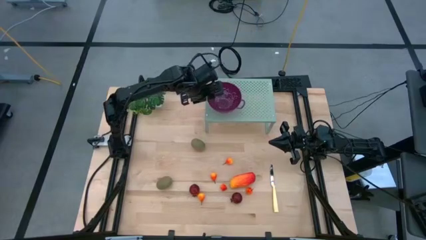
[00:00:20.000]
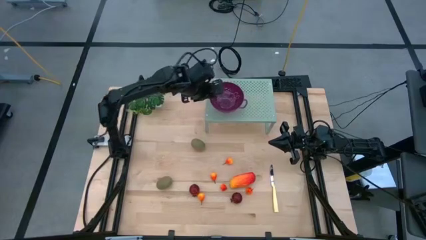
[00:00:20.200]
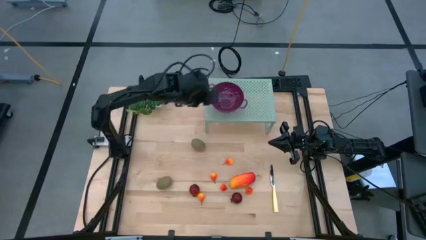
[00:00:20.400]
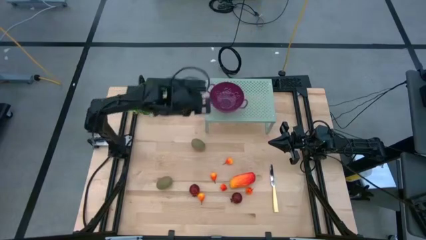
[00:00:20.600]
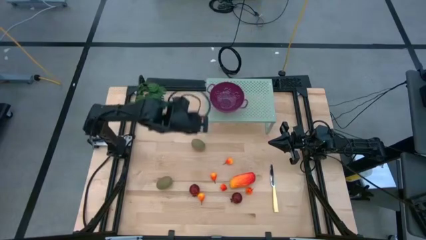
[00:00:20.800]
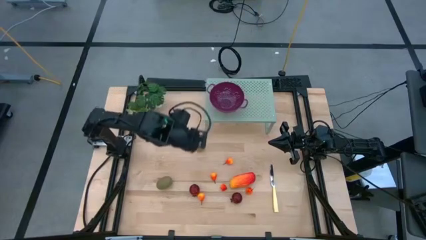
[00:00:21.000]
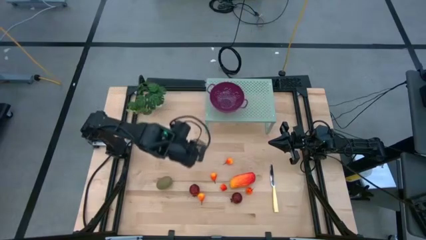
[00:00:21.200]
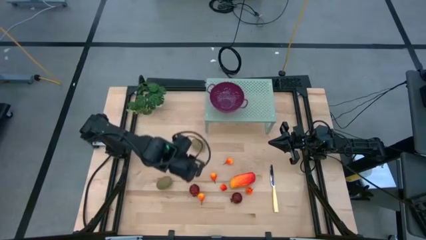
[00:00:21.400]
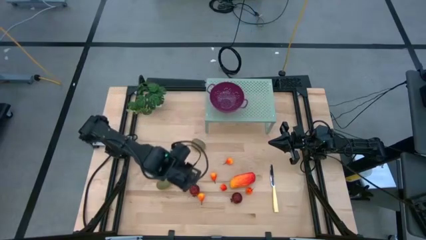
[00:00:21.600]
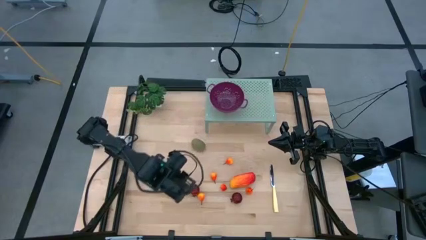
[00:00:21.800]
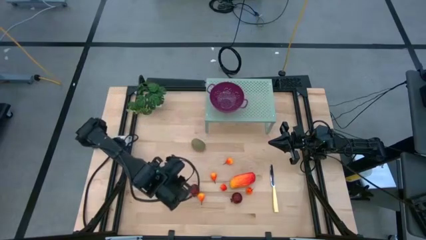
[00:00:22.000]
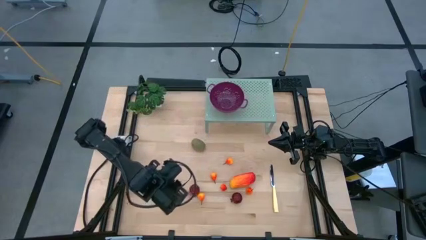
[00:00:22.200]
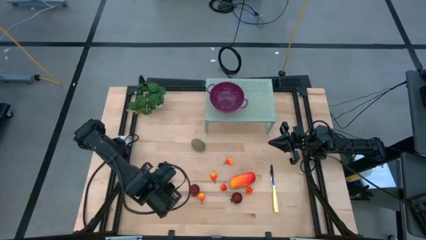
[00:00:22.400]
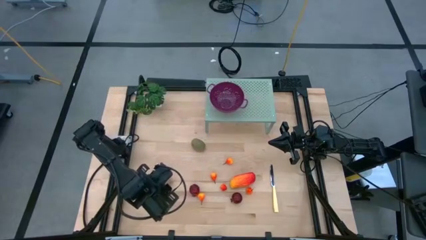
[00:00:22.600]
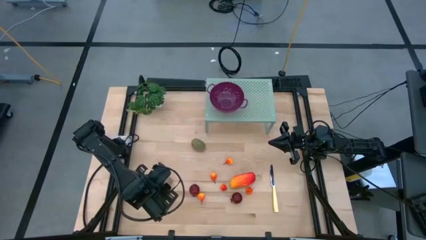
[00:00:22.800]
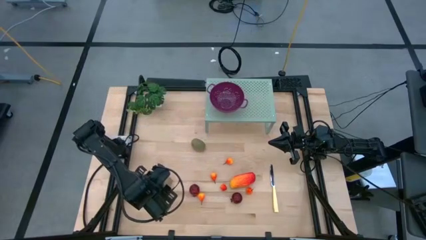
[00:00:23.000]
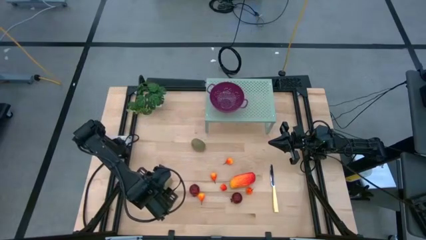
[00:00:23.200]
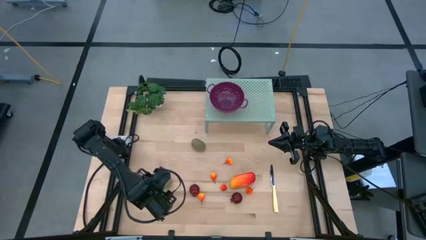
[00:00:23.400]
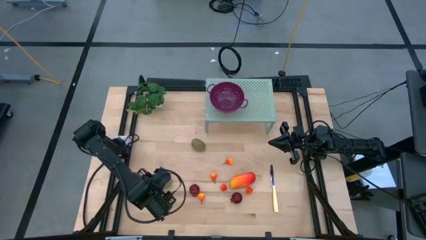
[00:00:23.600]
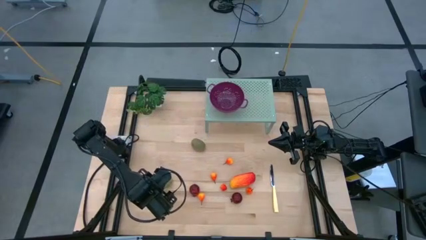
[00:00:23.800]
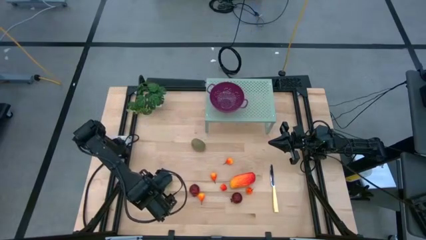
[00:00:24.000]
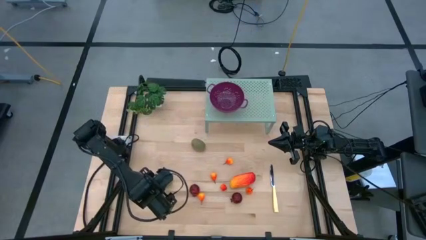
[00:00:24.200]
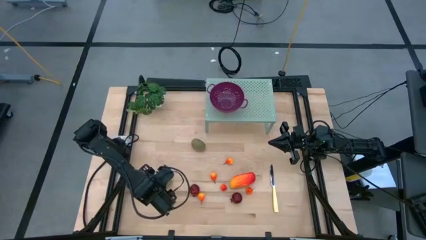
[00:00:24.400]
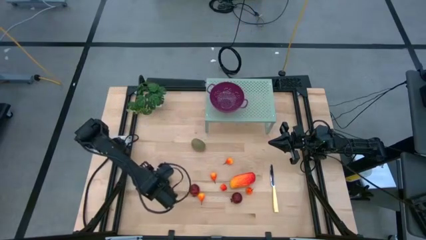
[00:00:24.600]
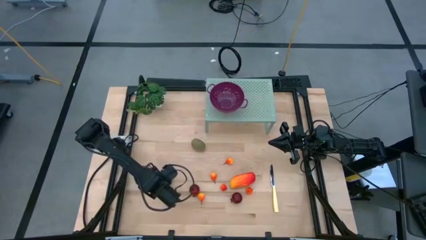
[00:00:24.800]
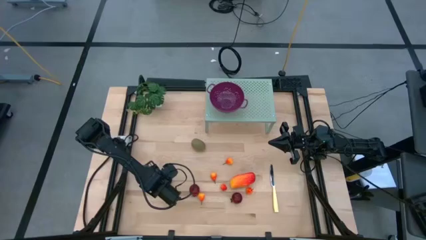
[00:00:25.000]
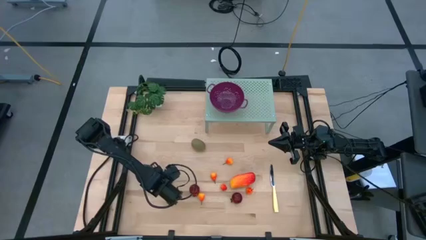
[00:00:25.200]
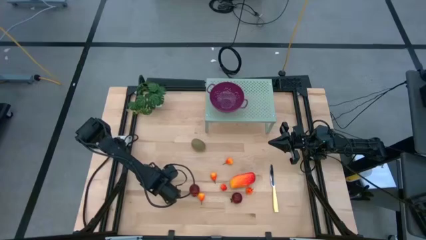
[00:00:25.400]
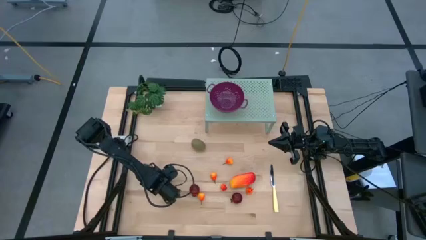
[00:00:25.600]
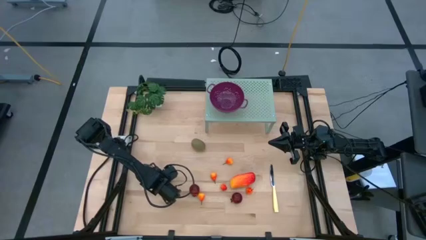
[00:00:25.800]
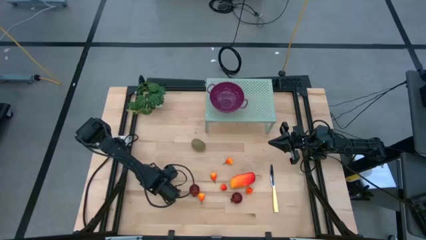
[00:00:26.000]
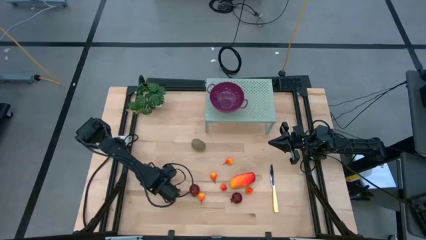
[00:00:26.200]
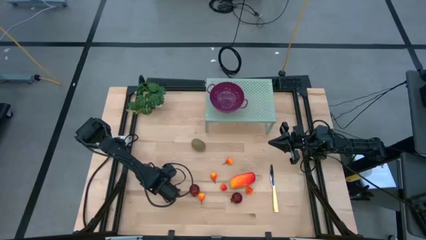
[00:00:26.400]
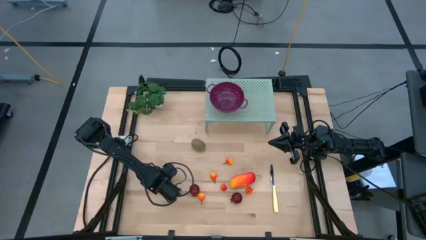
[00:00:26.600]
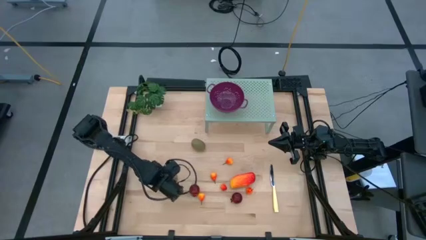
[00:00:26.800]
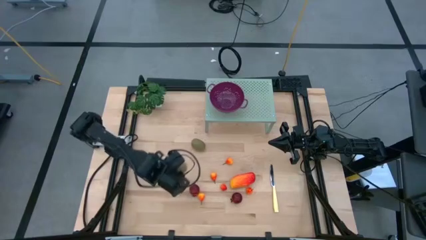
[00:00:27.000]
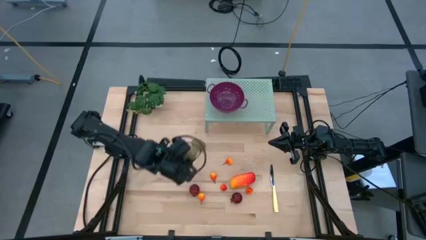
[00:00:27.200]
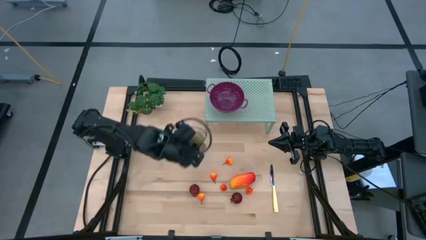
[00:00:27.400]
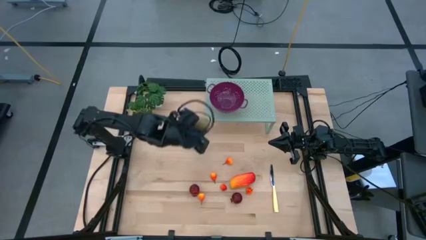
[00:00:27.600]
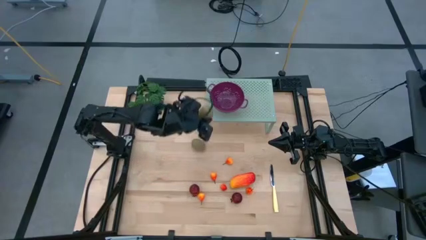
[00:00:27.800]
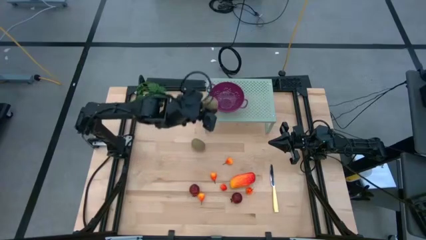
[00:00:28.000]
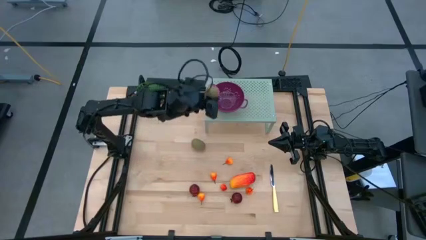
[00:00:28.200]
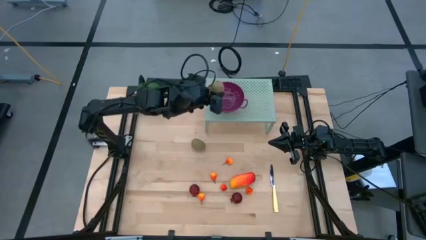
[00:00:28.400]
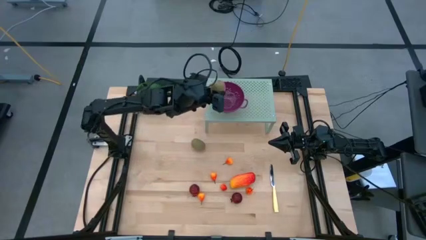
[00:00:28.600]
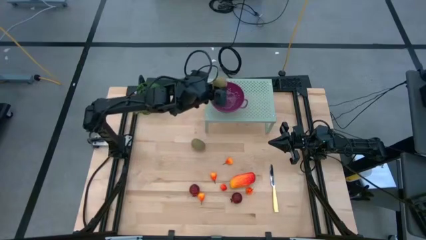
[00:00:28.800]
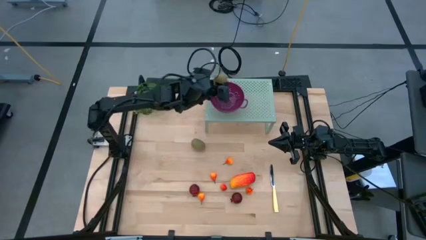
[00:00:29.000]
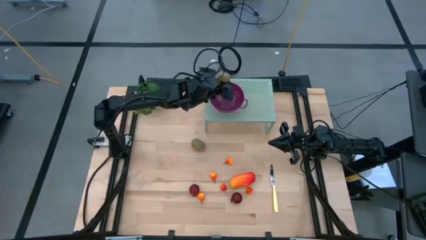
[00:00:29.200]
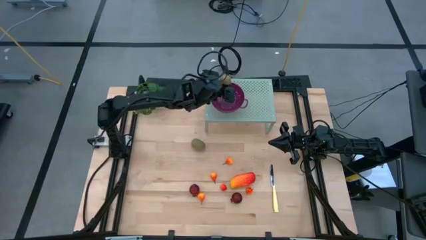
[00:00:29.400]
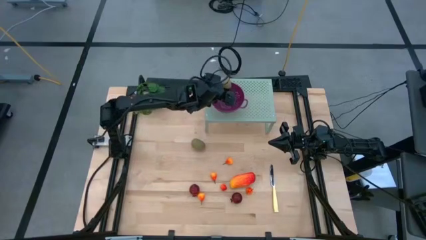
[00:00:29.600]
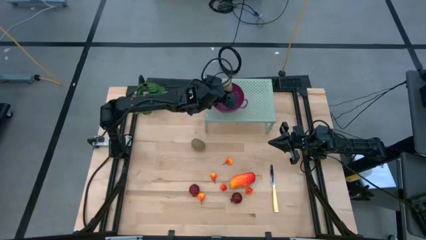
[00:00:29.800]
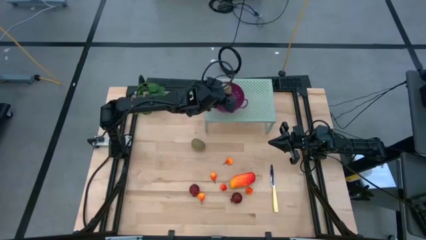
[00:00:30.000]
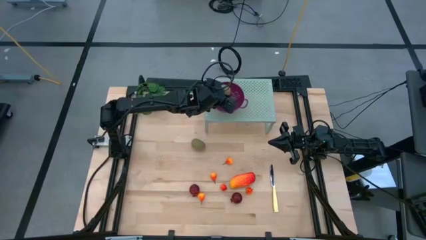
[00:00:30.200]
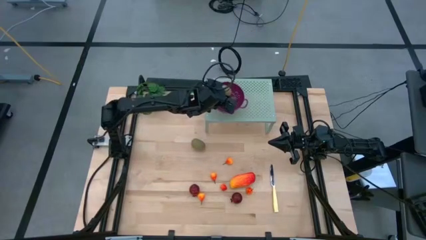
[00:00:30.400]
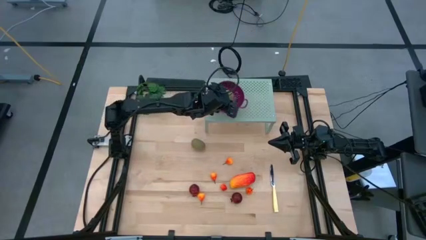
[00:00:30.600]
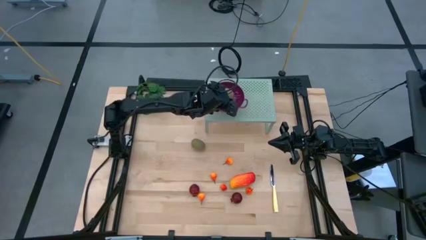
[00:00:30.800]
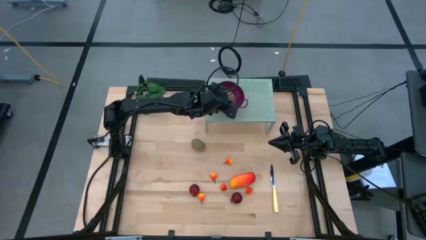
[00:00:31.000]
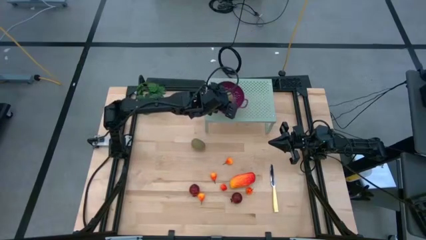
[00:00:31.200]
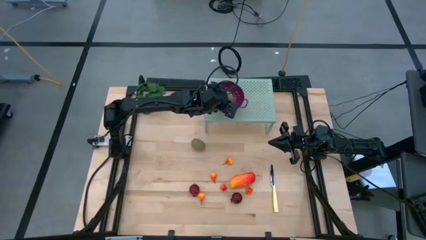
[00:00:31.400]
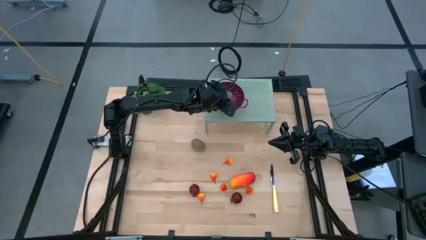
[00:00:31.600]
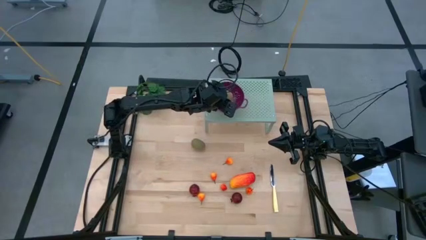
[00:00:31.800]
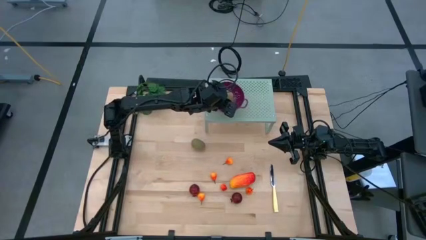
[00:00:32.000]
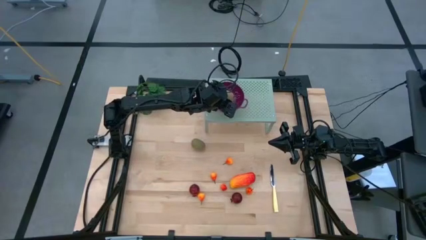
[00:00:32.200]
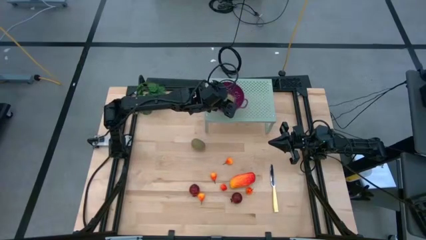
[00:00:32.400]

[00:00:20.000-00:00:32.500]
Task: Pick & Place Fruit
Put the kiwi into the strainer bowl on the shelf

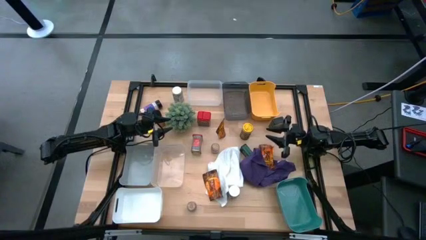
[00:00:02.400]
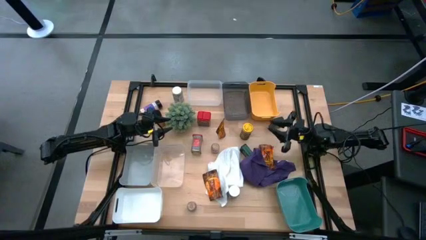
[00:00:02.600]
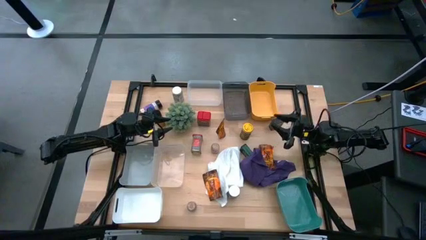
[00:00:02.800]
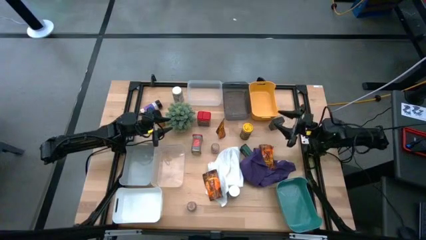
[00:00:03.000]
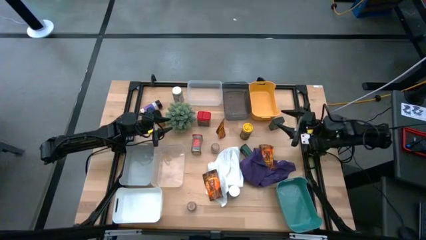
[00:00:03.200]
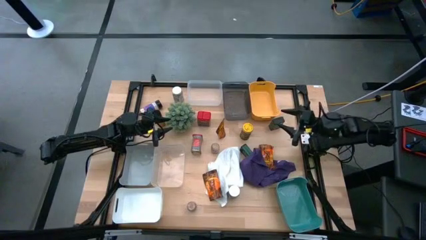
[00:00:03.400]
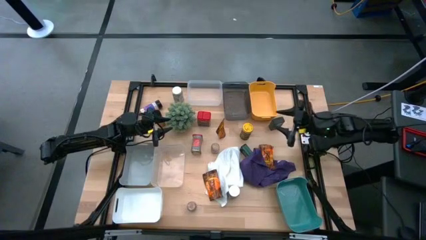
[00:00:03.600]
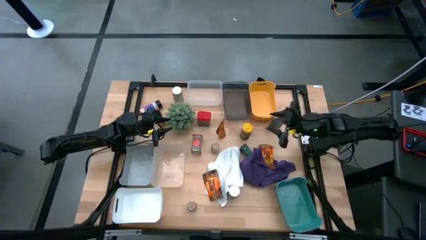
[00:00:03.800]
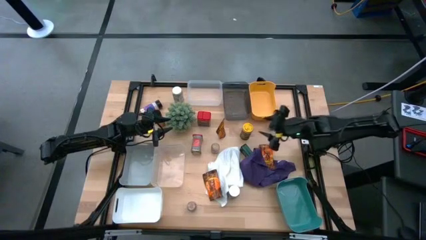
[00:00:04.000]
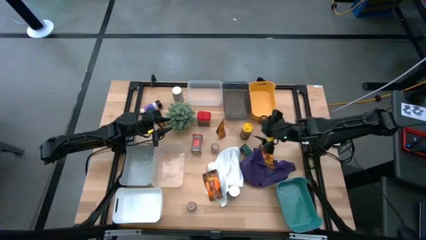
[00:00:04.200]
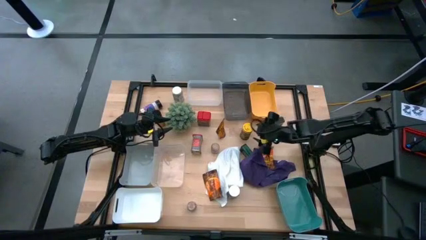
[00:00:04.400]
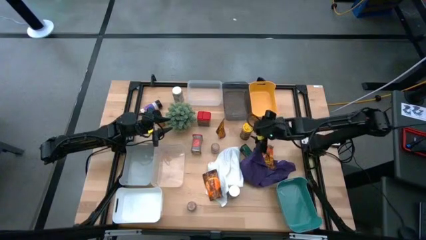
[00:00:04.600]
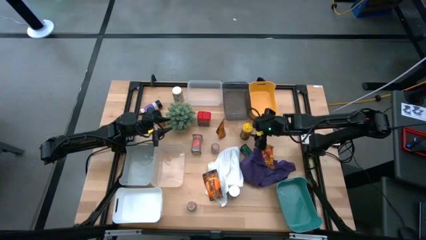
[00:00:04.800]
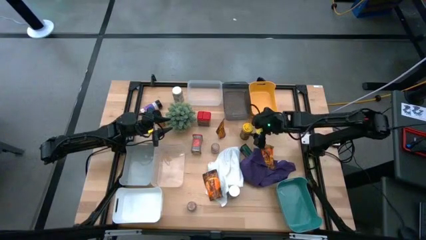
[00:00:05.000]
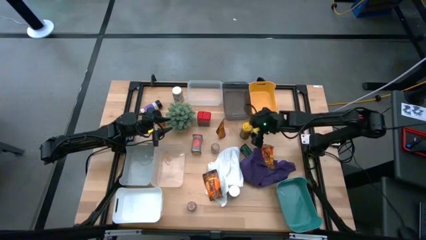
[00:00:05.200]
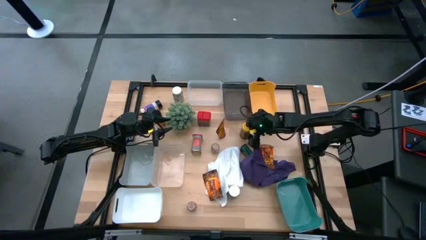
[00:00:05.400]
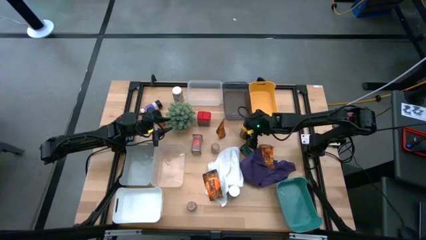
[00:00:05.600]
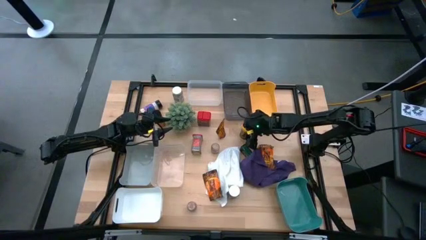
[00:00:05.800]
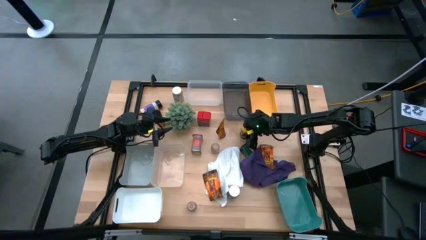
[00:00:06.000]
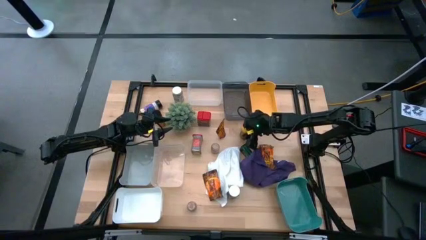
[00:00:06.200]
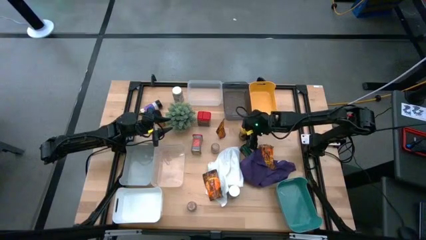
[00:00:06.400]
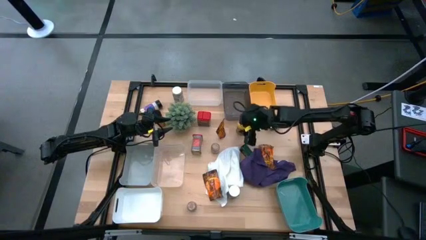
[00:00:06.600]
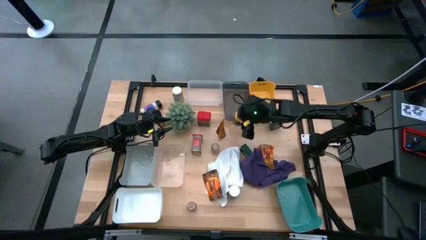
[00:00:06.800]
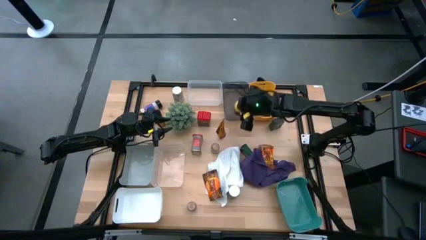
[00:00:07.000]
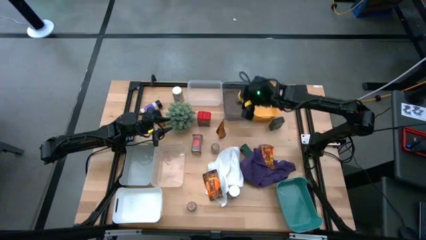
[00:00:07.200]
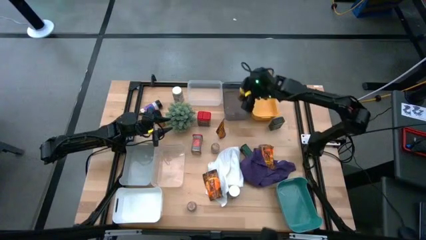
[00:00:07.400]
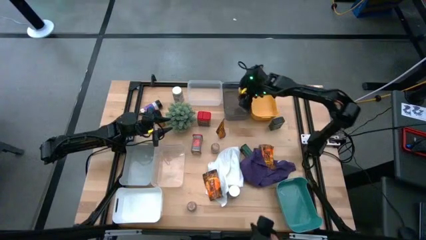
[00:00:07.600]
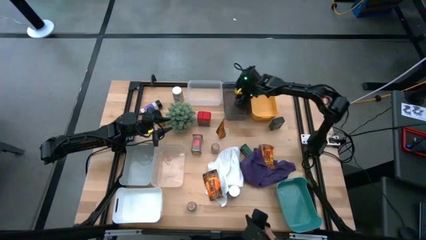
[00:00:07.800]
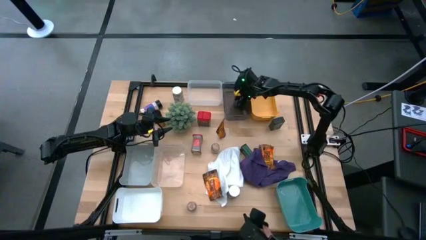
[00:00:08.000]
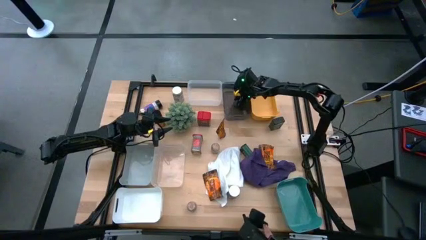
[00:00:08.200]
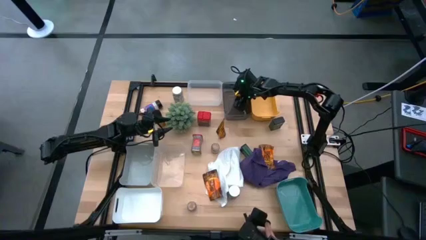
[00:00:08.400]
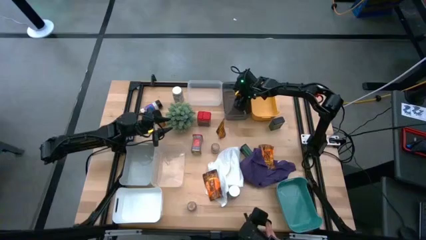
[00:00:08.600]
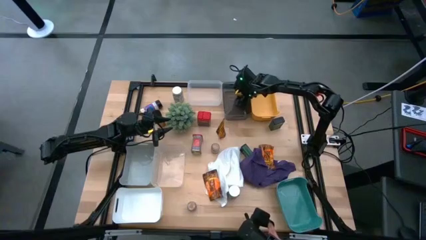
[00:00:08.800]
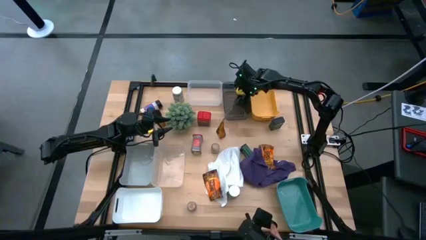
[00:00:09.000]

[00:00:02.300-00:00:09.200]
Task: Sort spices by type
Put the yellow seasoning bottle into the black bin
